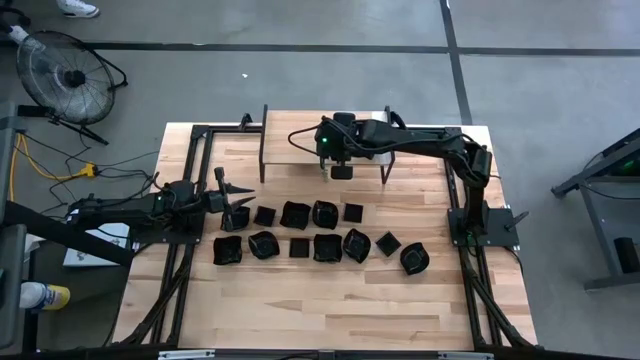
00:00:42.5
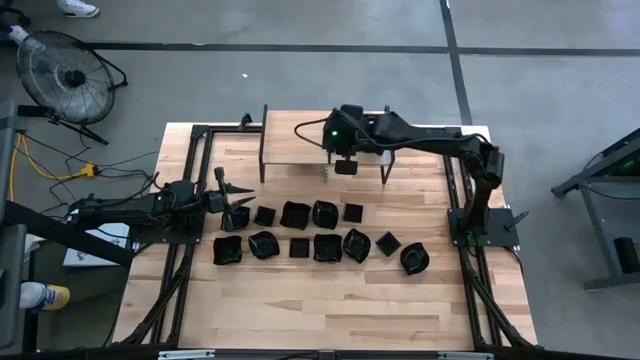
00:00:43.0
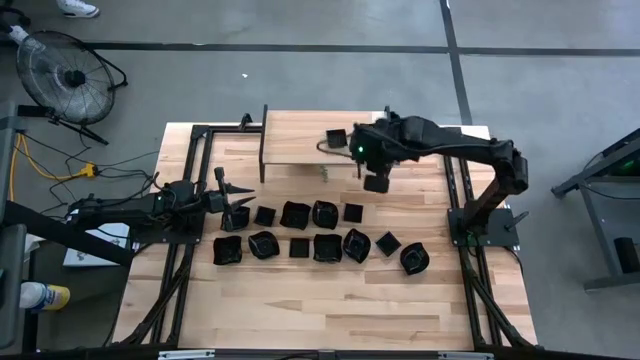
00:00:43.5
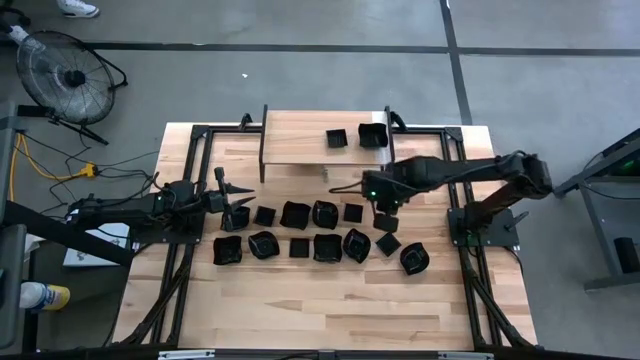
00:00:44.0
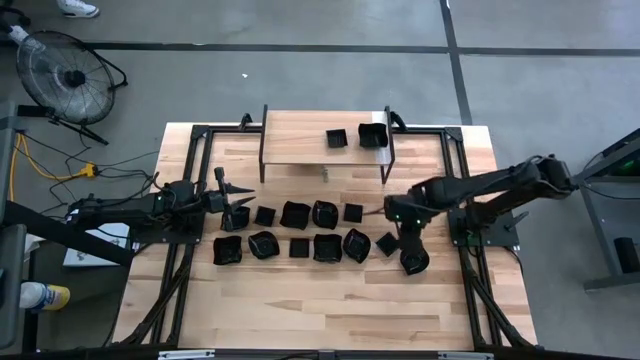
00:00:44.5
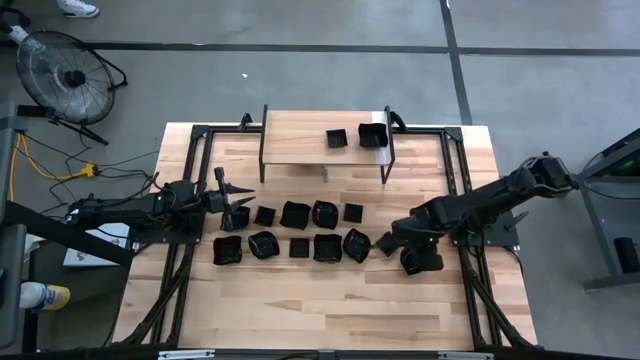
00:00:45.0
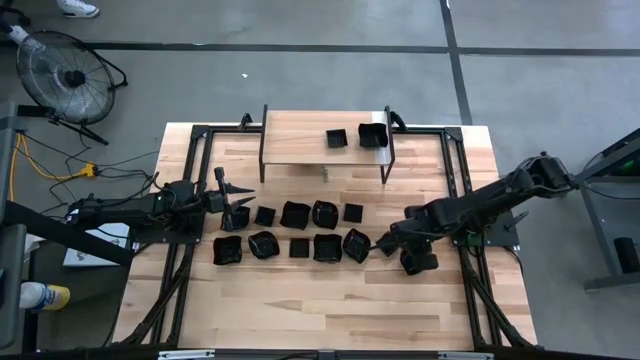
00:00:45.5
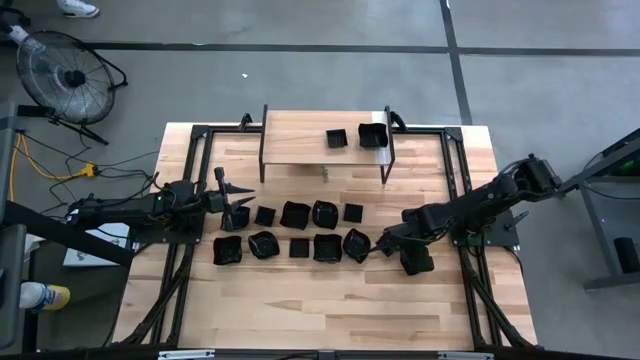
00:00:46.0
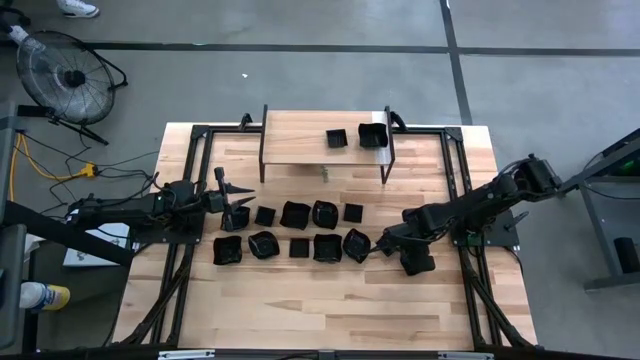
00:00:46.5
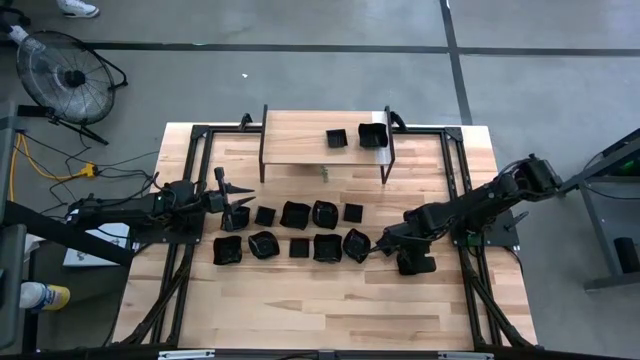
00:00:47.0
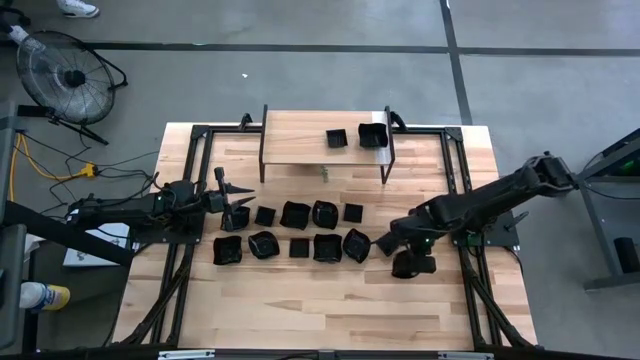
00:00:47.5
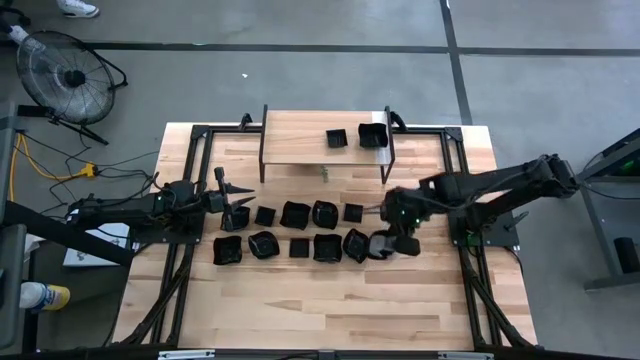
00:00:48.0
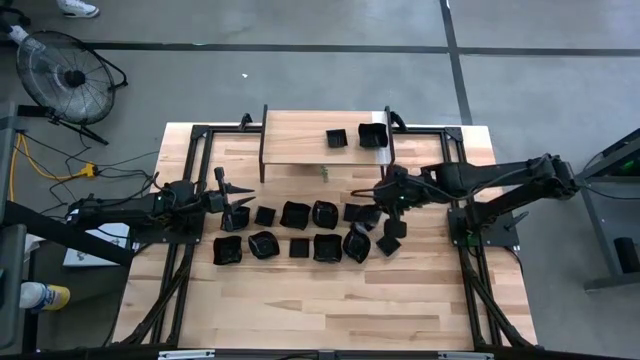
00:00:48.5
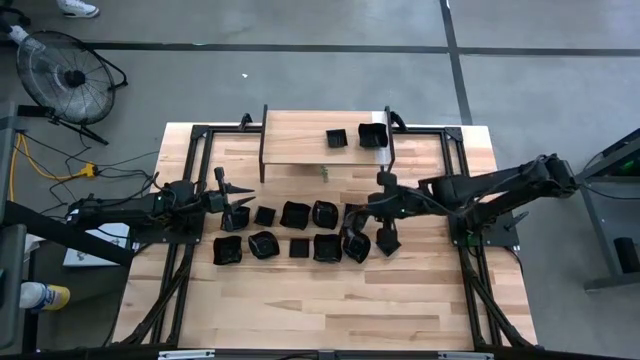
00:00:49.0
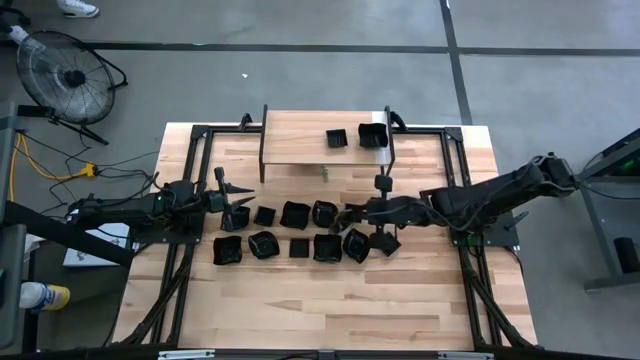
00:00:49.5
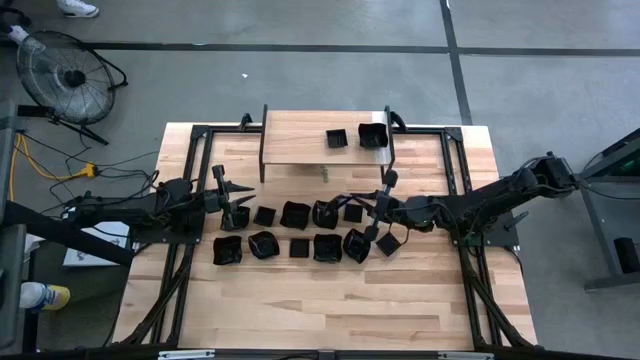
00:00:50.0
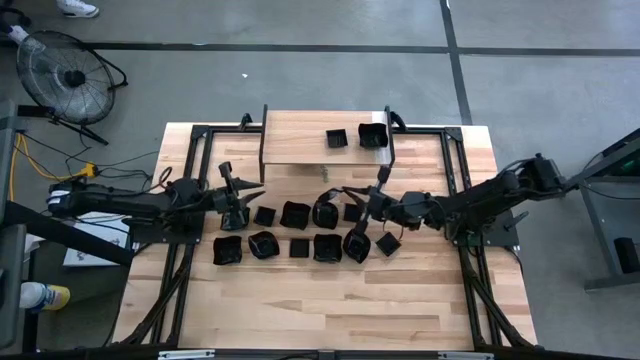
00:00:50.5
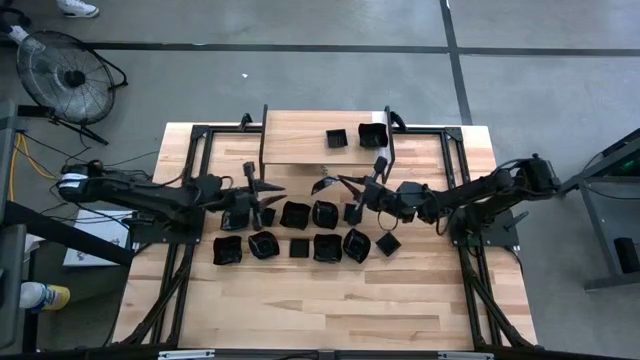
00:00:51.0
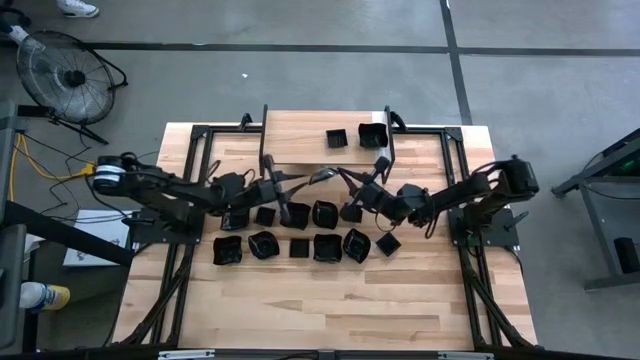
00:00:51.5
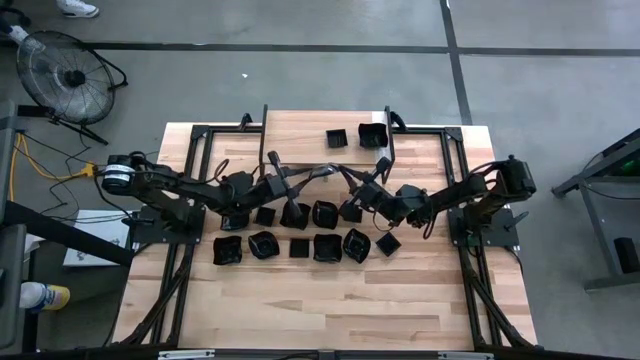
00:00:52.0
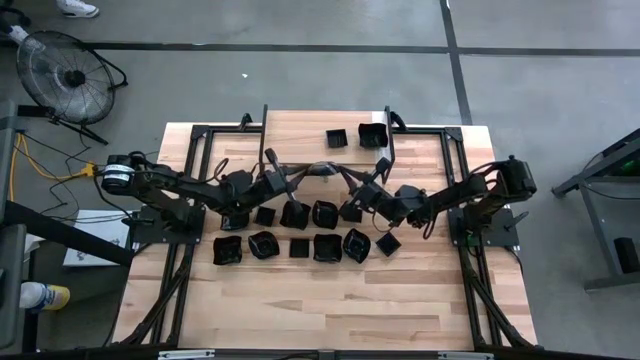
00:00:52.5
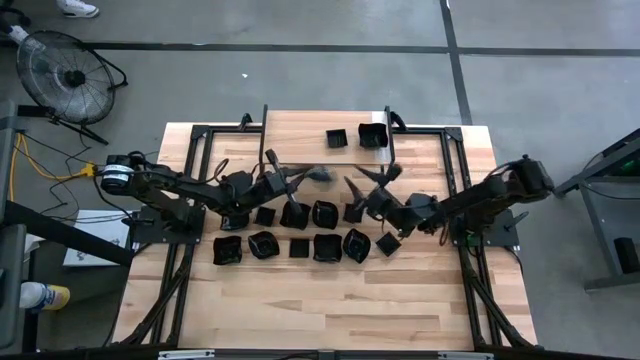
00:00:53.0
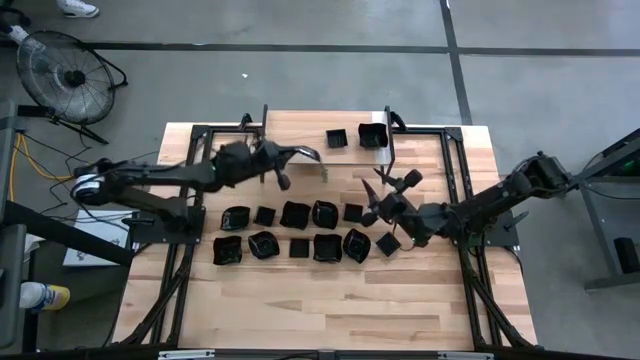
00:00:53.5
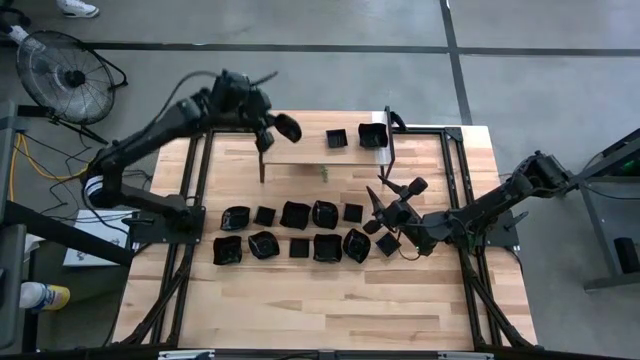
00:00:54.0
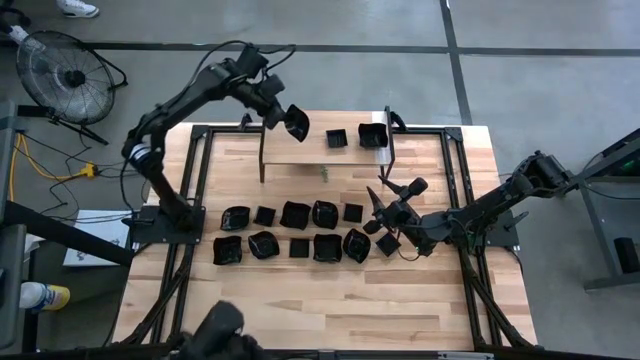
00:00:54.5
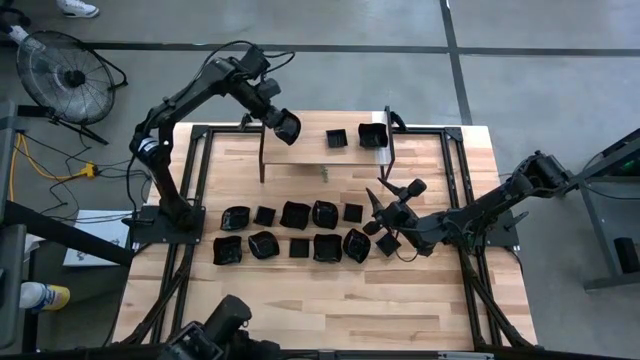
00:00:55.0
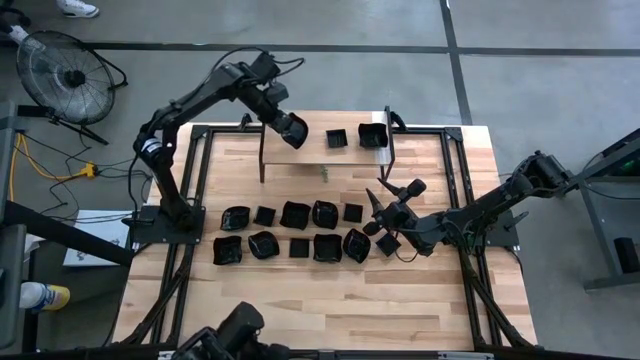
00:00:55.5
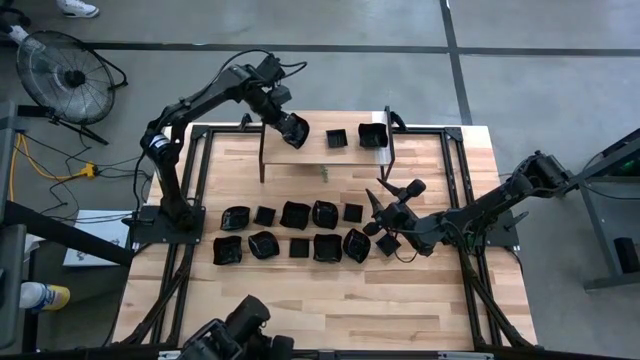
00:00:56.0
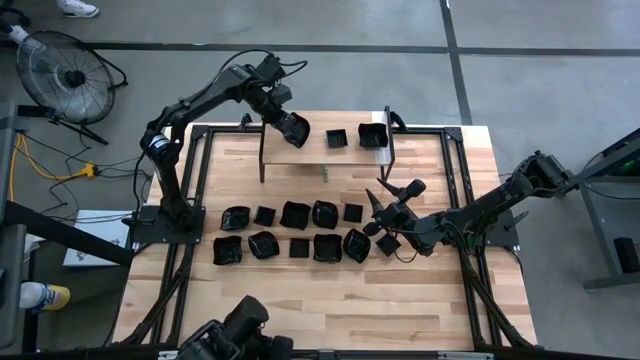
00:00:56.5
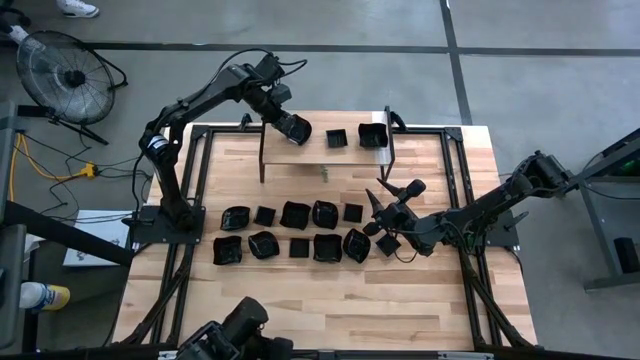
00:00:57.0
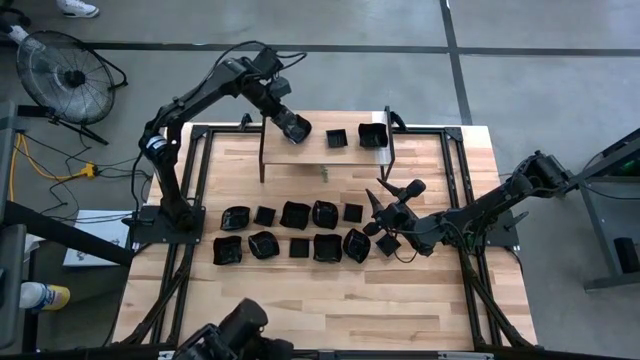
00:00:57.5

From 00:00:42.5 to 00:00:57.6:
Task: Pick & Place Mini shaped plates
Put the leaf shaped plate on the shelf

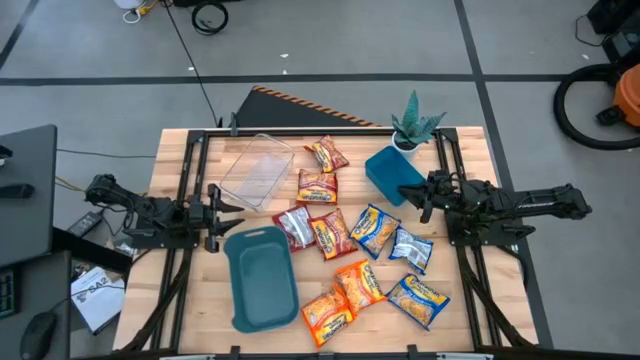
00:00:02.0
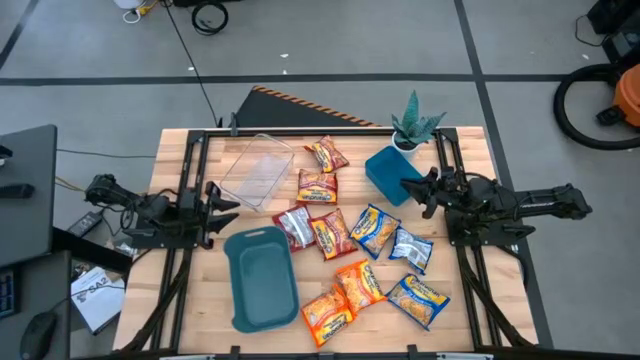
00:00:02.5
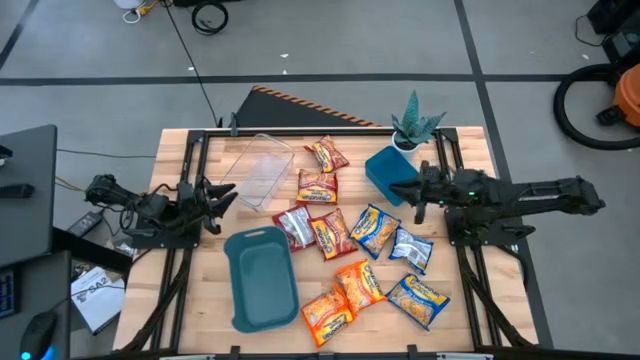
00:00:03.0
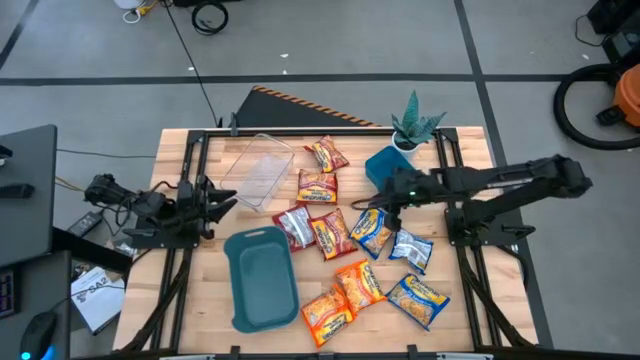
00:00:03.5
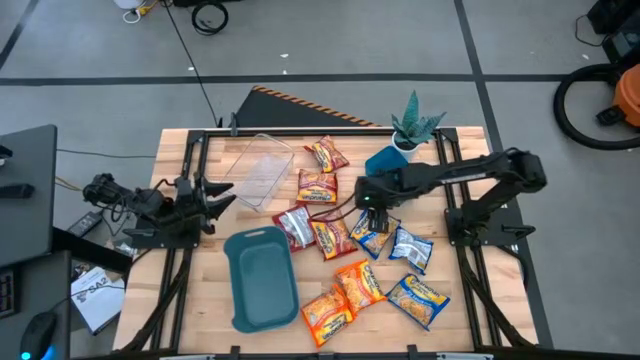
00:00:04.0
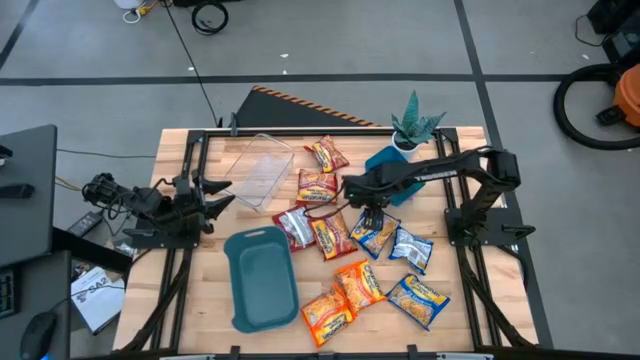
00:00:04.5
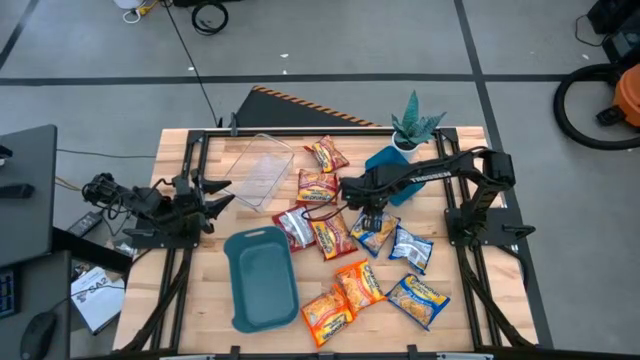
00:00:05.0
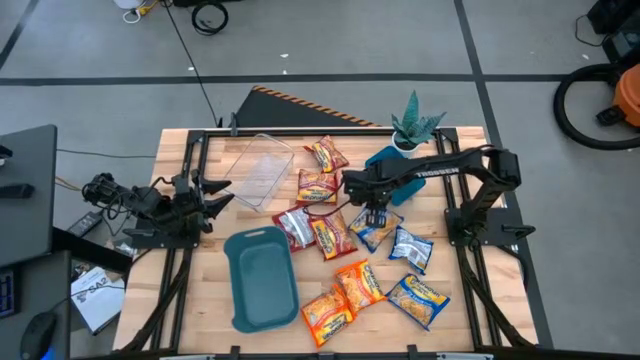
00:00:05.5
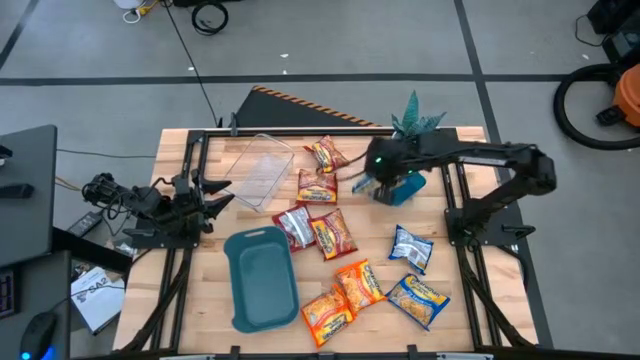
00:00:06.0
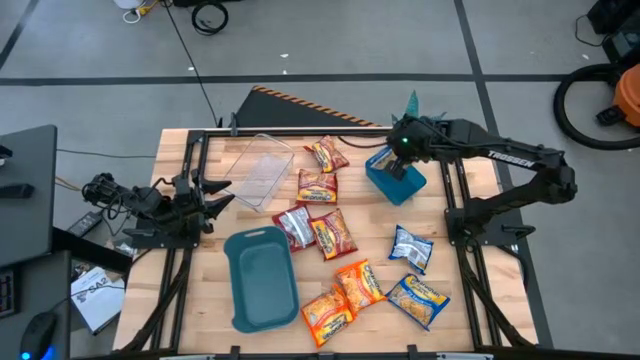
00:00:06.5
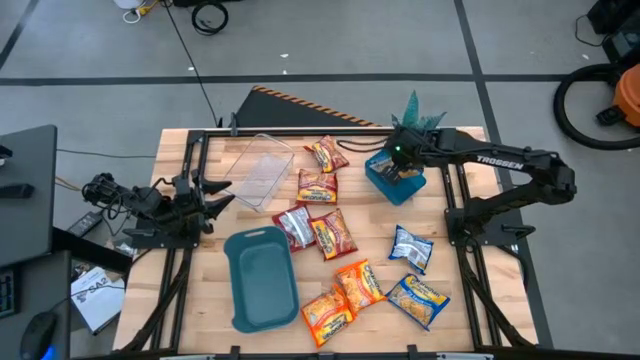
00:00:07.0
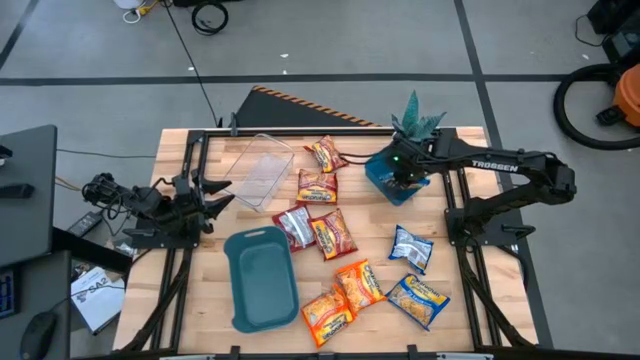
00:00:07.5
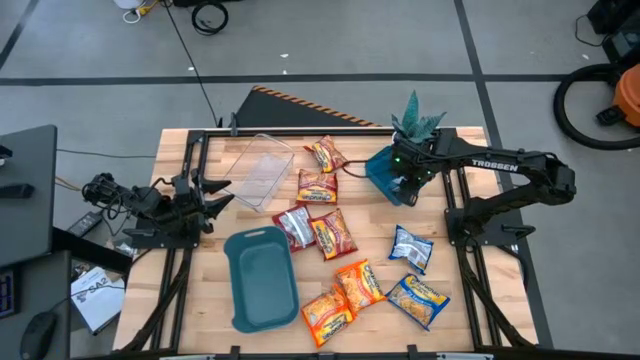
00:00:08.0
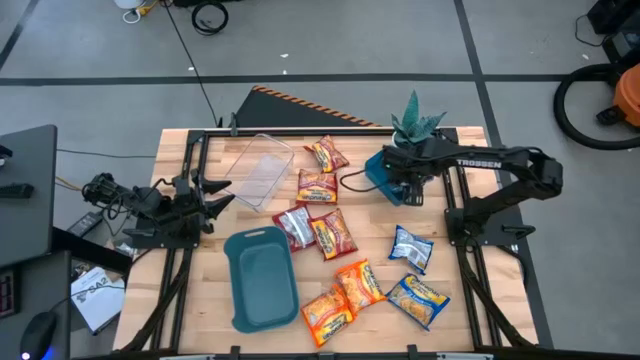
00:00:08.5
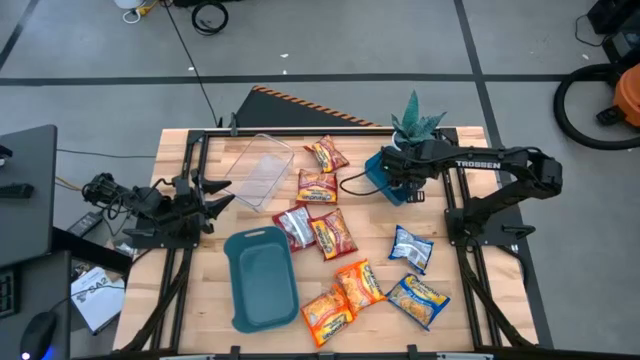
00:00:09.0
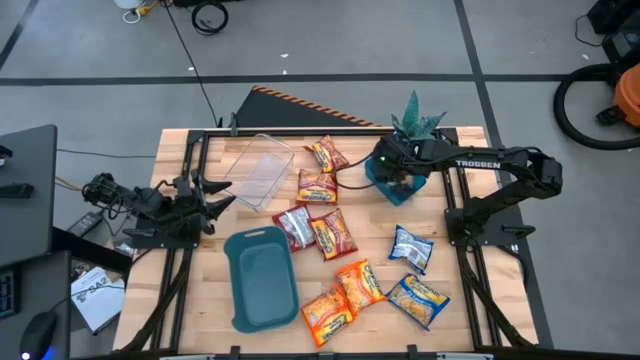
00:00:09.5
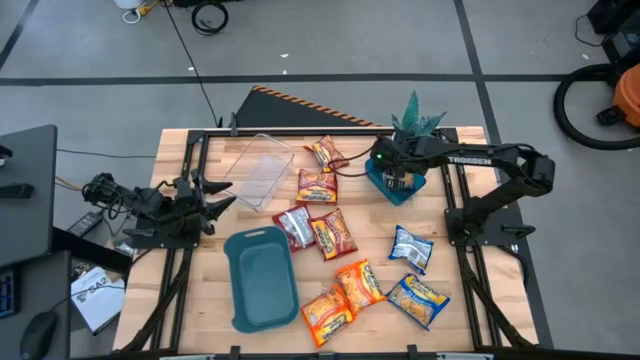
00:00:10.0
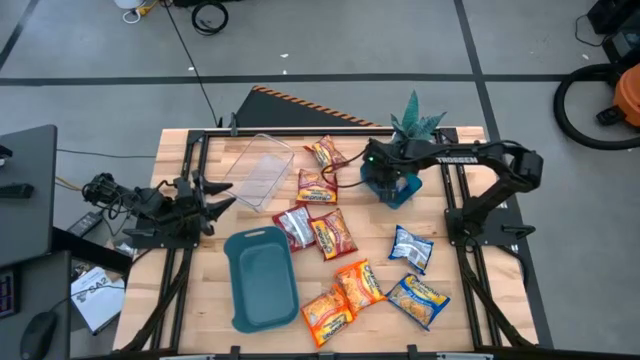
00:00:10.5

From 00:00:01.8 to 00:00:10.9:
Task: Sort Maruchan noodles
Put the blue noodle pack into the blue bin
